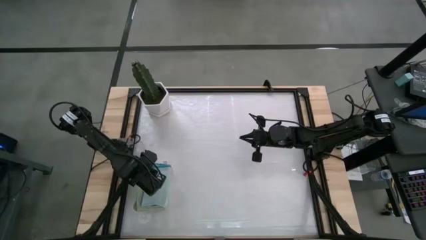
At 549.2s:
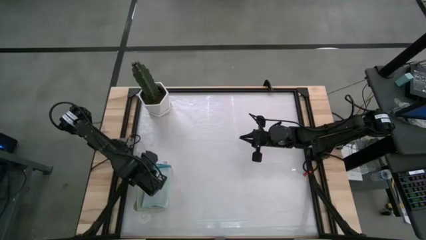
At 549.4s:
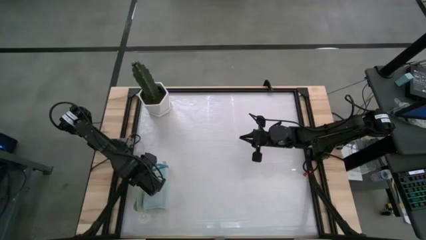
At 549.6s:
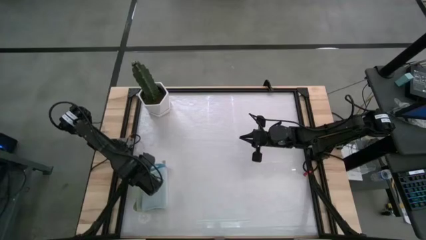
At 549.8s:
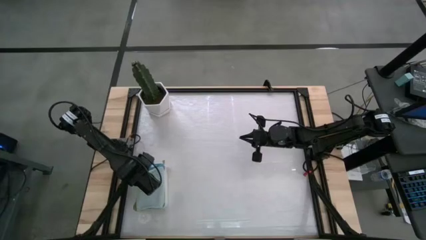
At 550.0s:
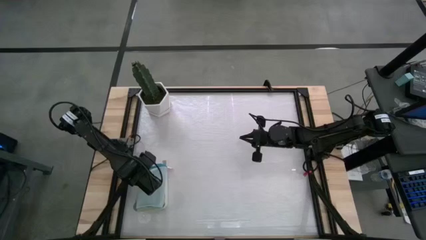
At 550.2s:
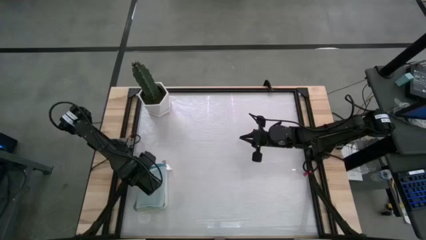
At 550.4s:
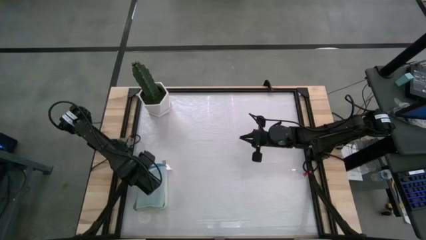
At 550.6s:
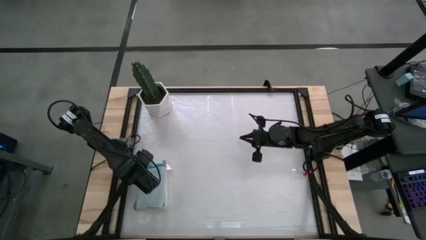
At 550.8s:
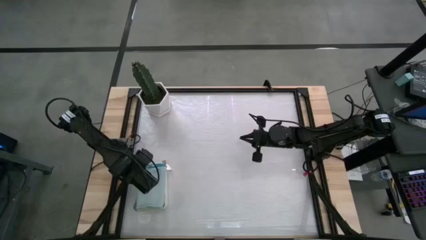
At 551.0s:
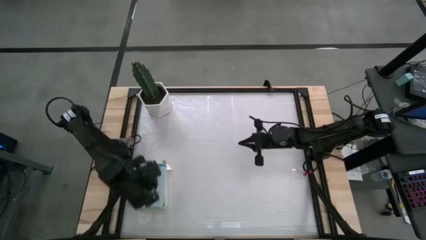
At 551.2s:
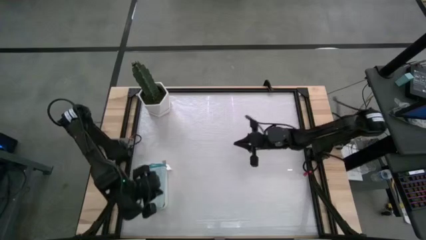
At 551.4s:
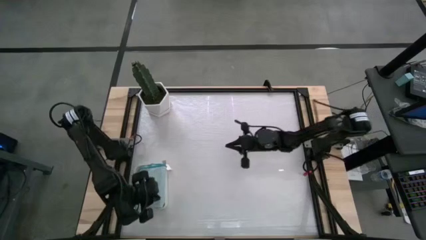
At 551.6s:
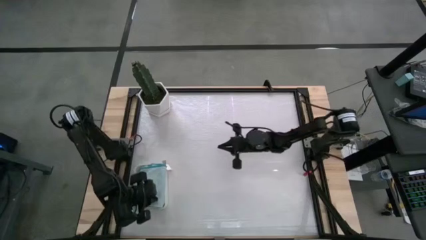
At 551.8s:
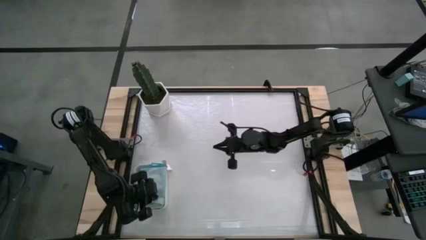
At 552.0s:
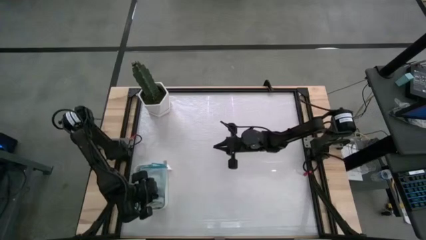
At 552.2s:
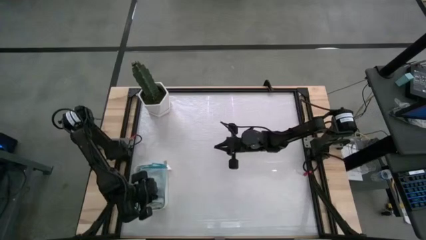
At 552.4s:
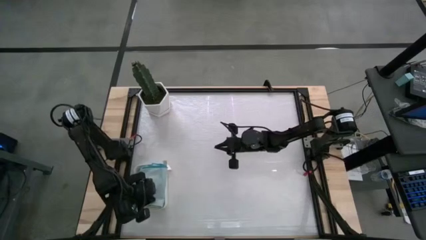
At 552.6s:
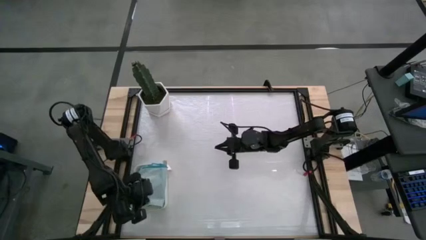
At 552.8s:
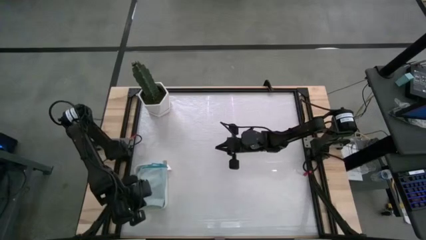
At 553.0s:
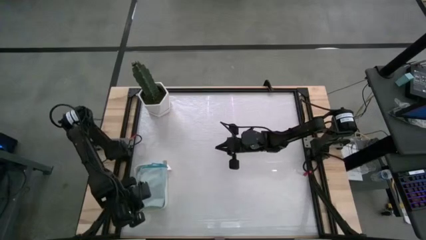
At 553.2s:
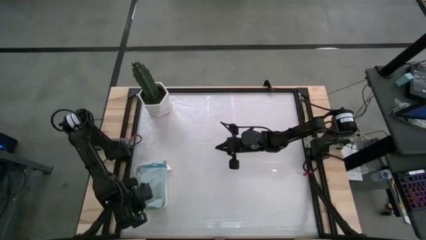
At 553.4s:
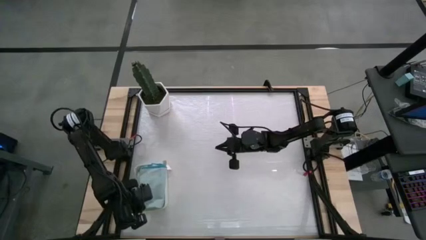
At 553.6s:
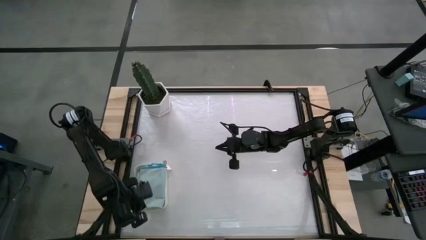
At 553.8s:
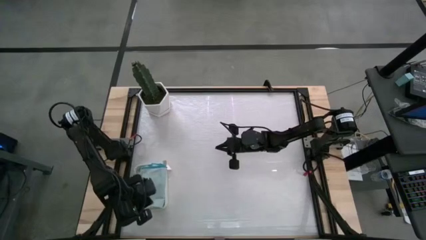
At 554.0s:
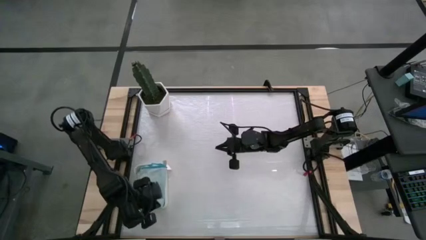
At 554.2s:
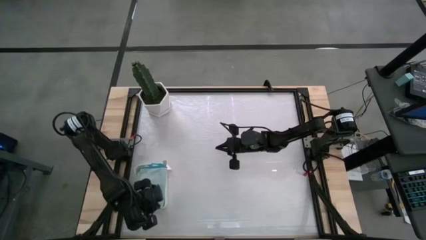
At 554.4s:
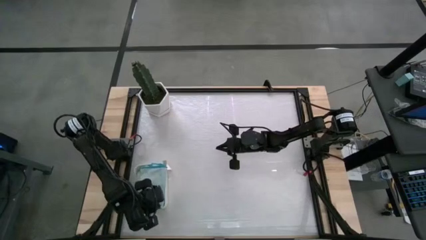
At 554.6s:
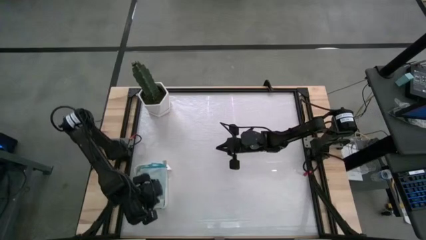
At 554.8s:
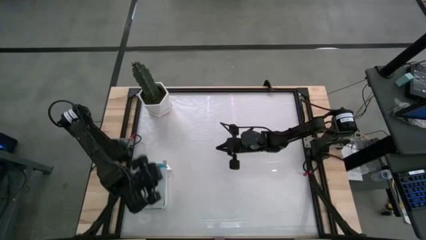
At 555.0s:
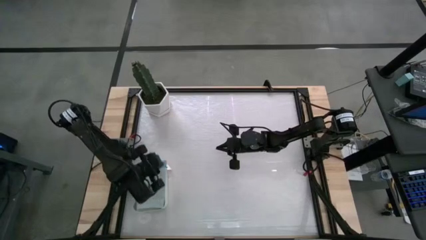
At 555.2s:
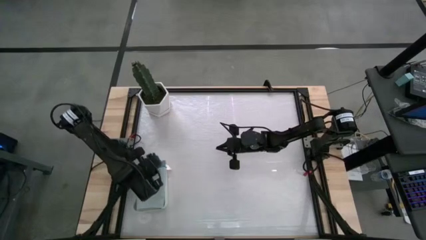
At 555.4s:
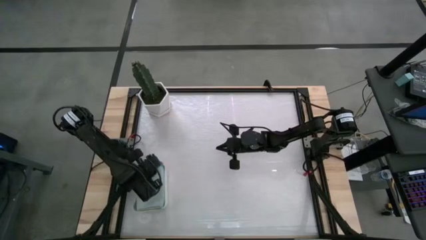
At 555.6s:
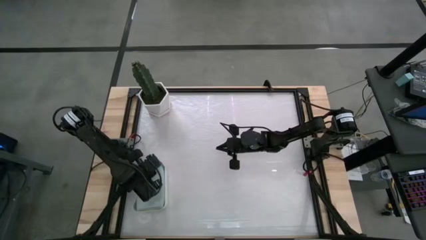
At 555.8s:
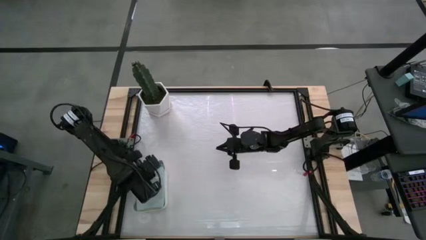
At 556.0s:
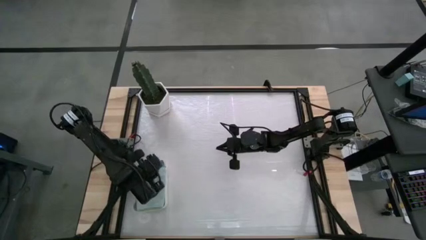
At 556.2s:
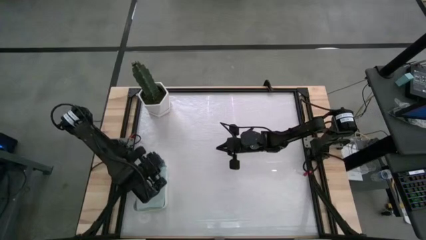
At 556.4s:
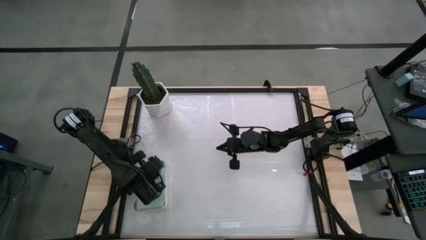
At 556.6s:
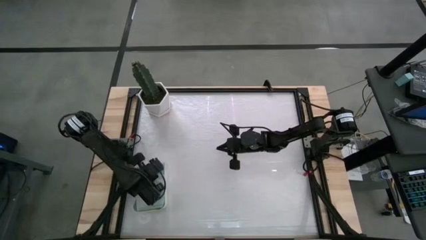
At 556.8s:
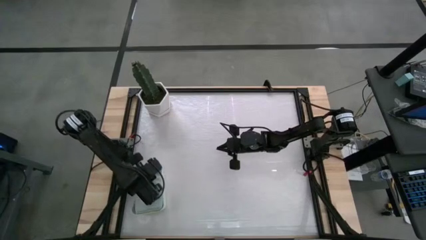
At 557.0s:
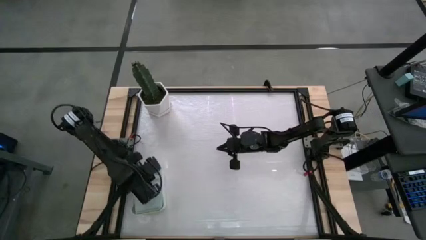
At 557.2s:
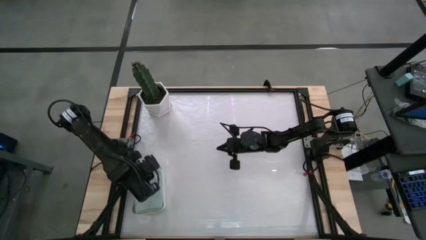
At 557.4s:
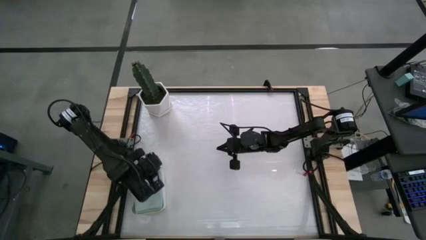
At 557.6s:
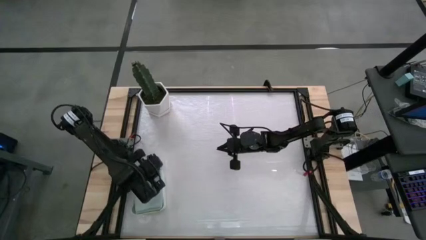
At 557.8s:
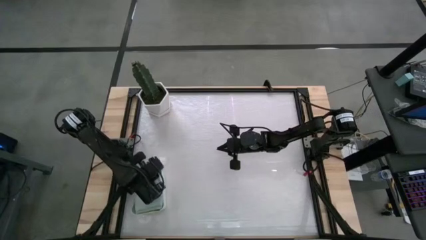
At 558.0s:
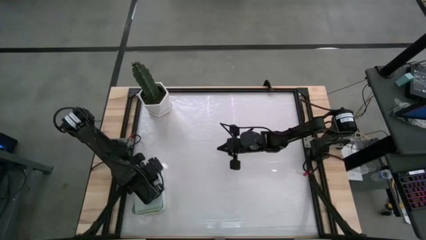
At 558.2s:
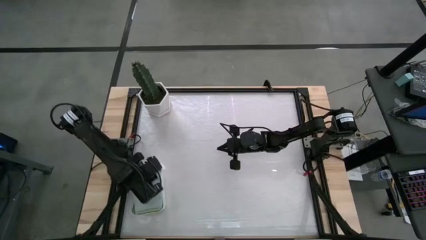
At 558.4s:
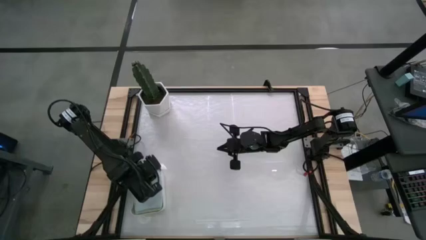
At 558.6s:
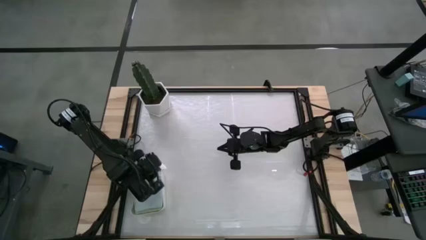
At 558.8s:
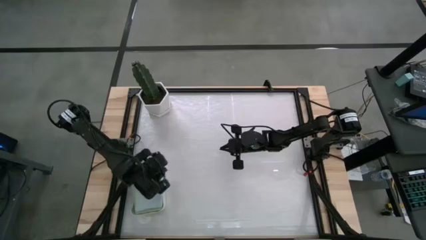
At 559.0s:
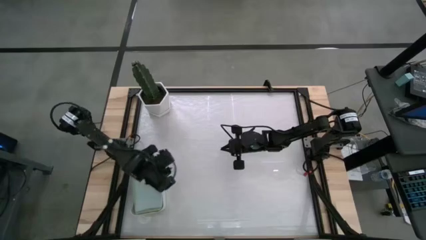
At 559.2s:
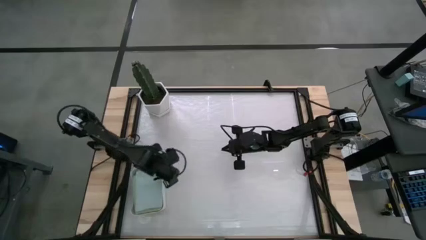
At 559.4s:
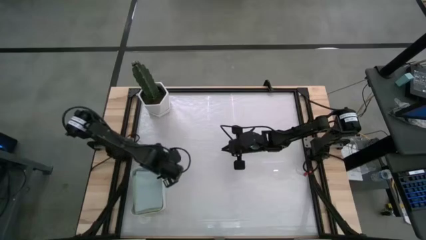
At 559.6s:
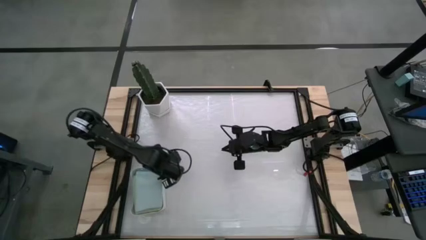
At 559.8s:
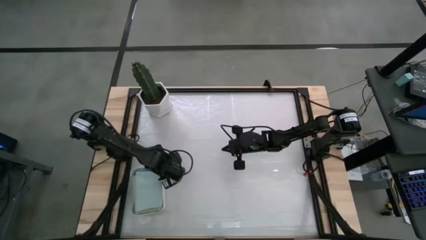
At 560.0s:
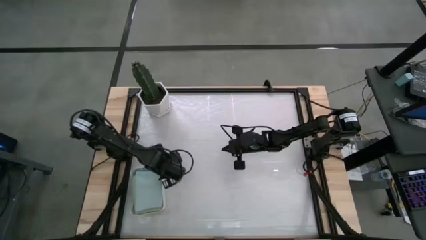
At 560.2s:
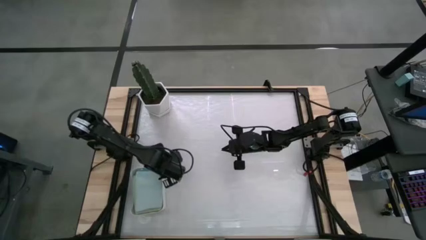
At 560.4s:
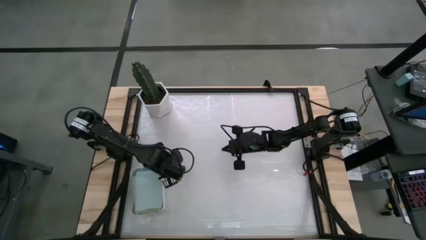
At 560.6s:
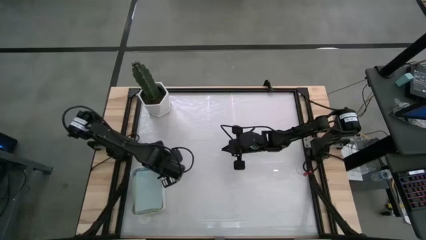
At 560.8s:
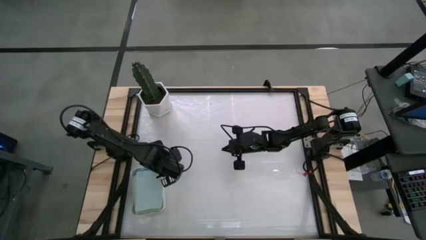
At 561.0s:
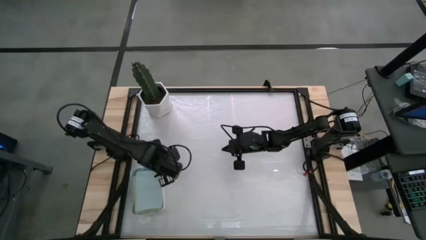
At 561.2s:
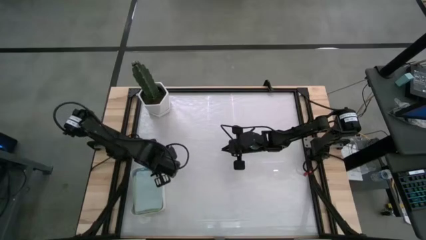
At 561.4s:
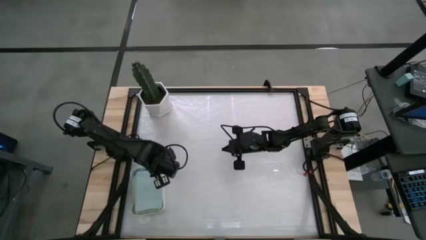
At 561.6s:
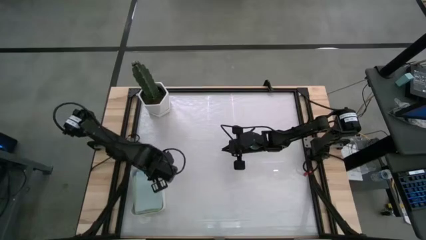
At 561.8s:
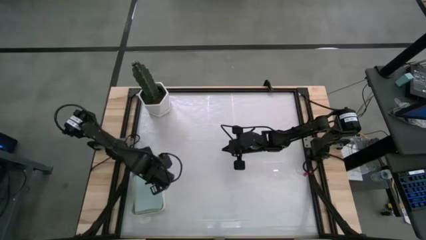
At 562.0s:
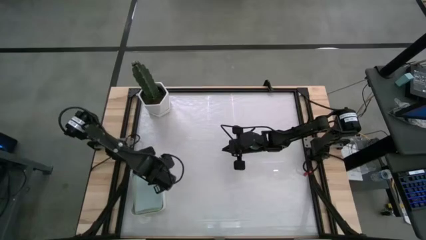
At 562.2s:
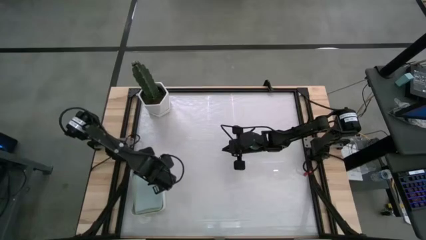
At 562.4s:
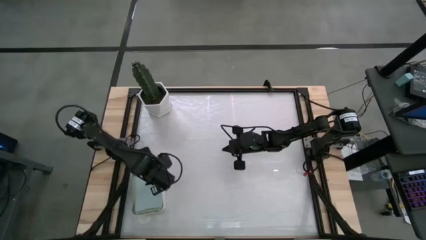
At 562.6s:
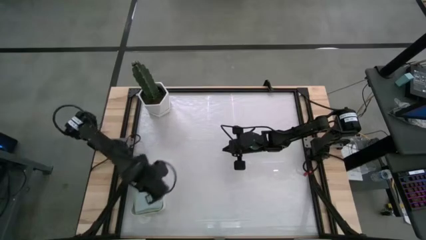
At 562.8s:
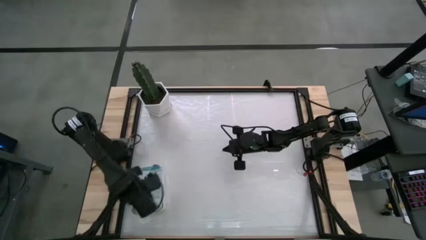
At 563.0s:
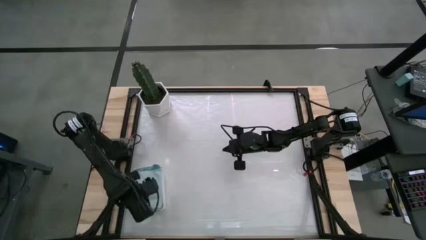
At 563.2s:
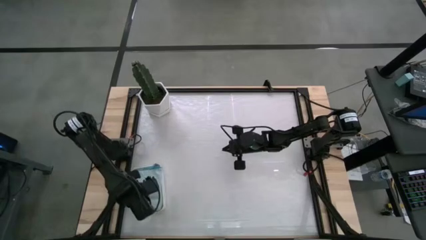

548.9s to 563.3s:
Task: Fold microfiber towels
Put the light blue microfiber towel into the white bin
